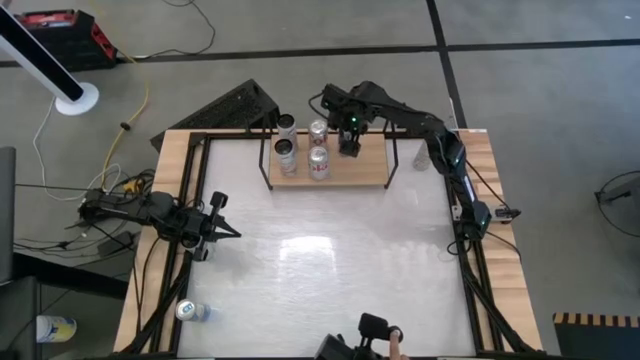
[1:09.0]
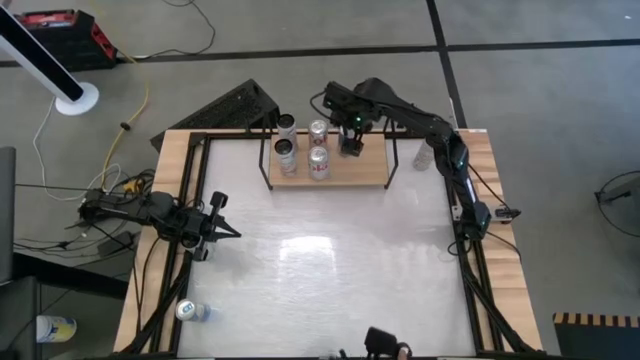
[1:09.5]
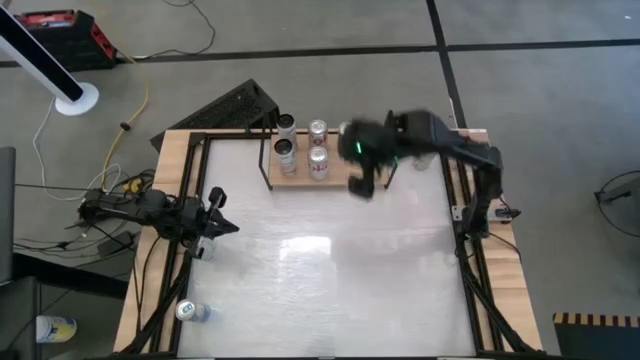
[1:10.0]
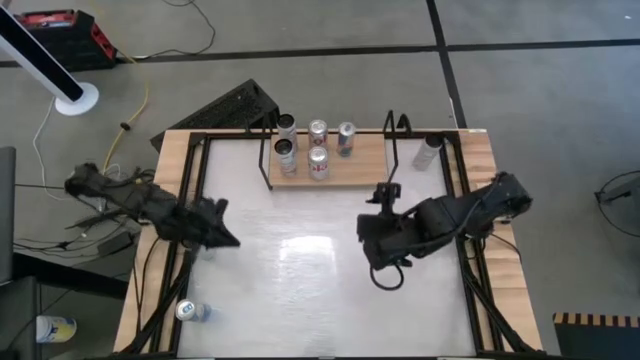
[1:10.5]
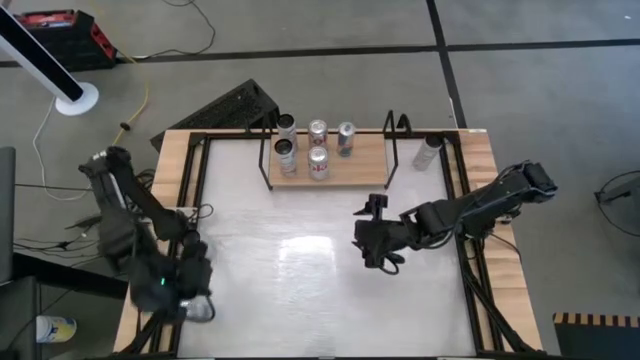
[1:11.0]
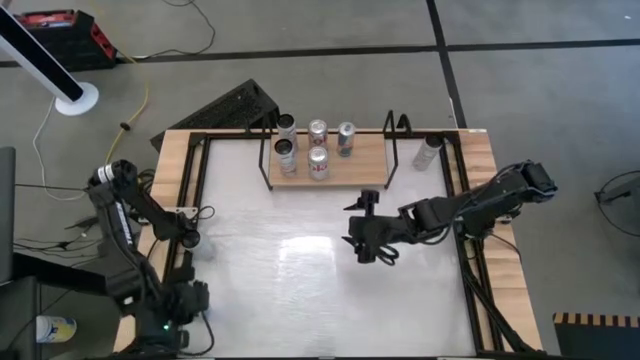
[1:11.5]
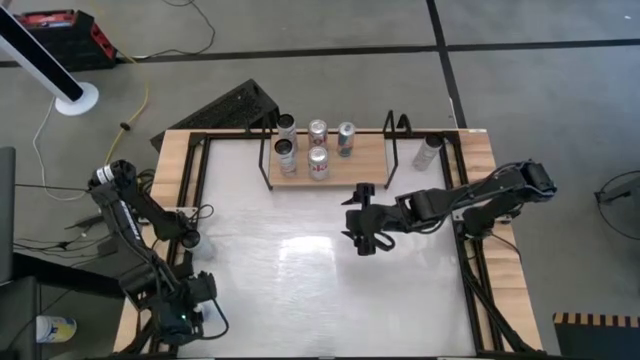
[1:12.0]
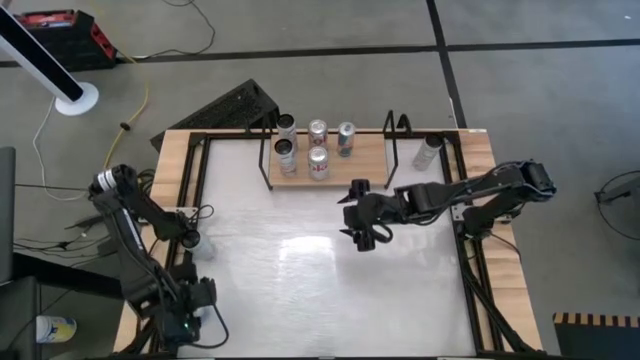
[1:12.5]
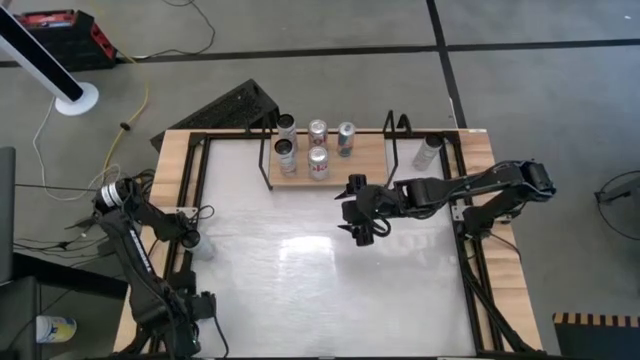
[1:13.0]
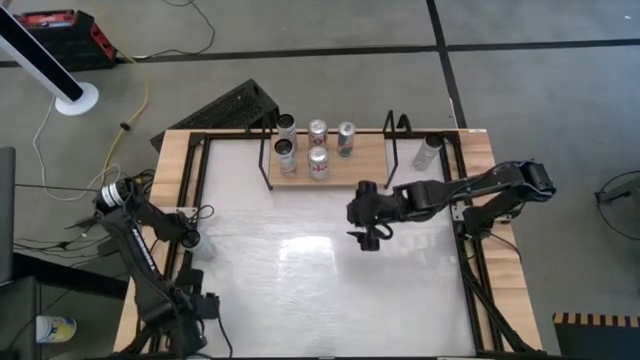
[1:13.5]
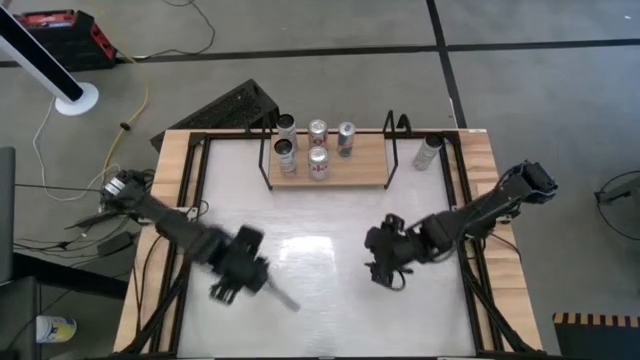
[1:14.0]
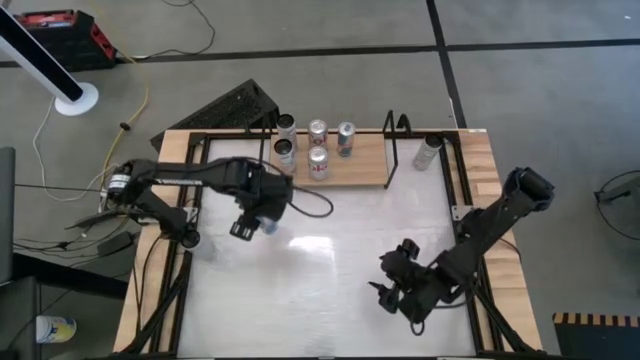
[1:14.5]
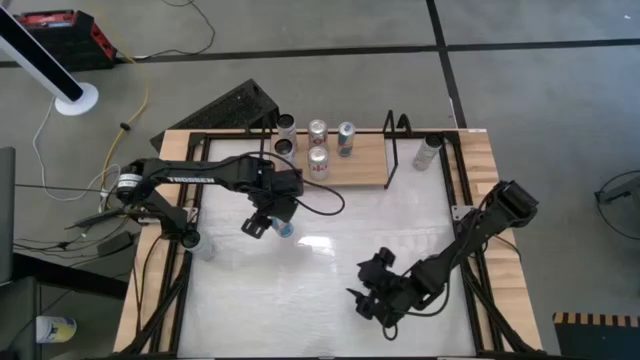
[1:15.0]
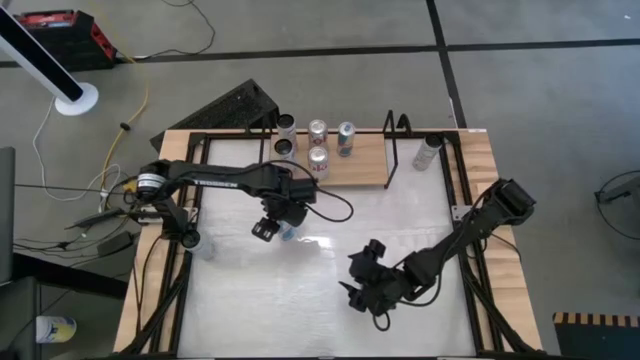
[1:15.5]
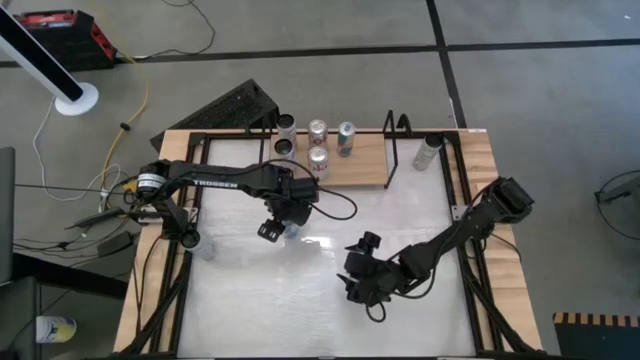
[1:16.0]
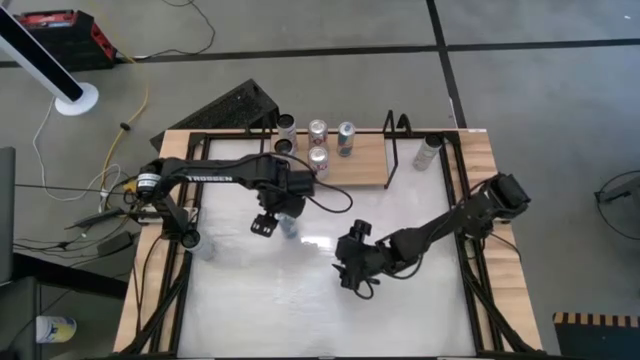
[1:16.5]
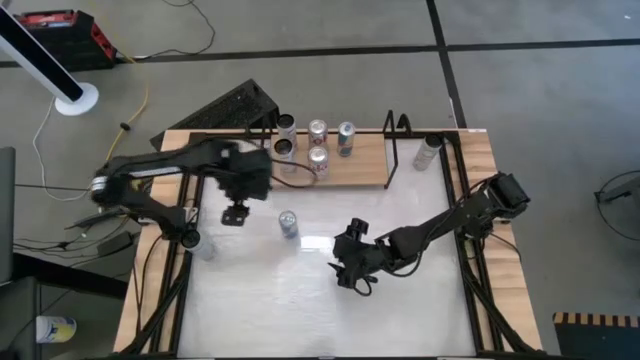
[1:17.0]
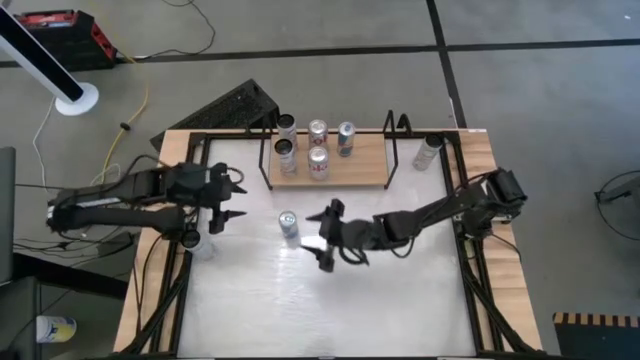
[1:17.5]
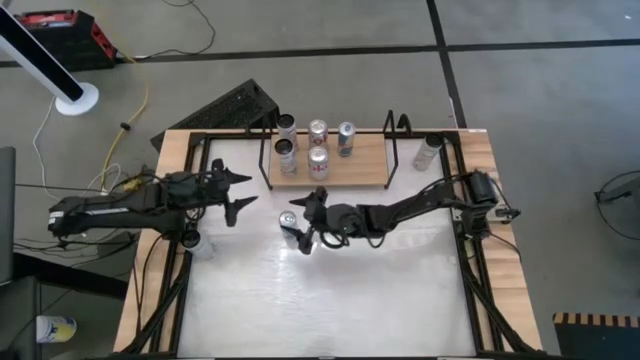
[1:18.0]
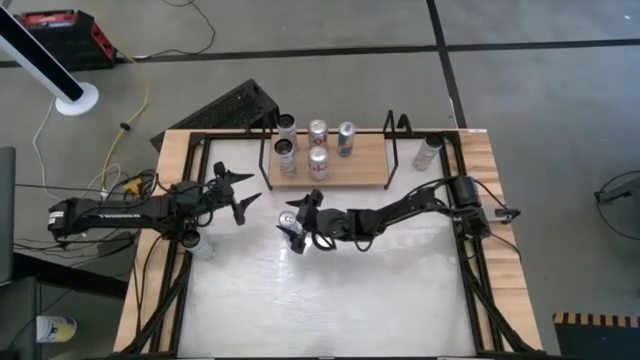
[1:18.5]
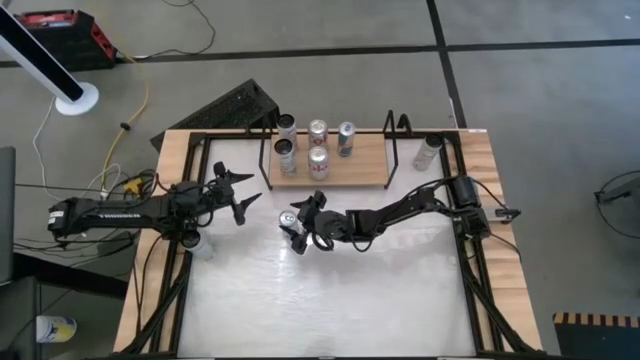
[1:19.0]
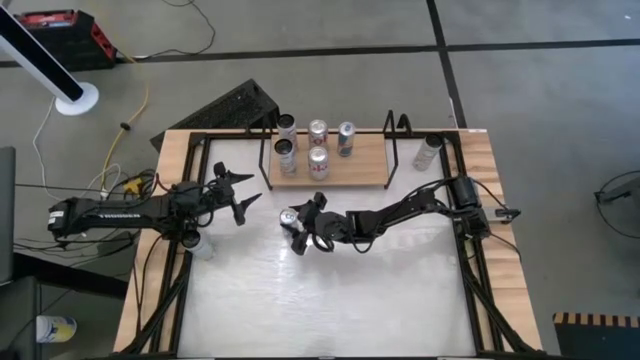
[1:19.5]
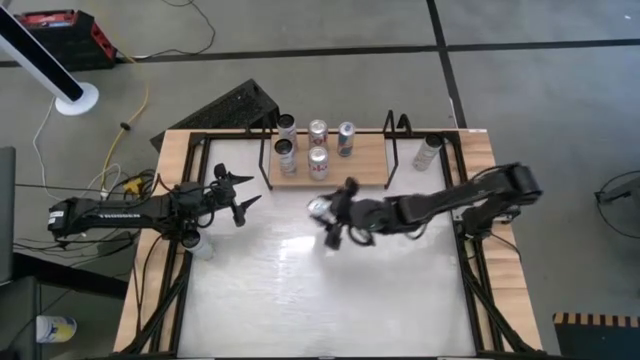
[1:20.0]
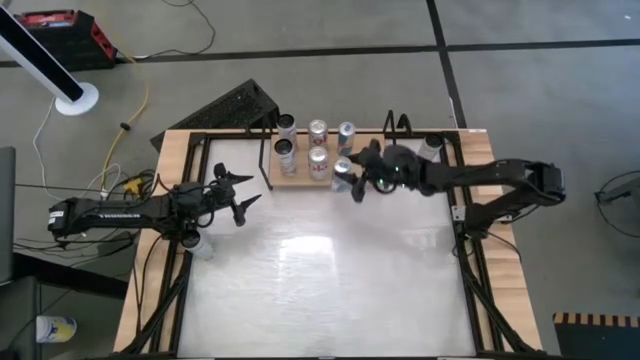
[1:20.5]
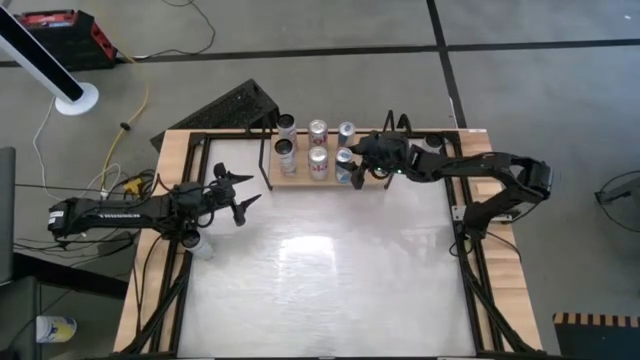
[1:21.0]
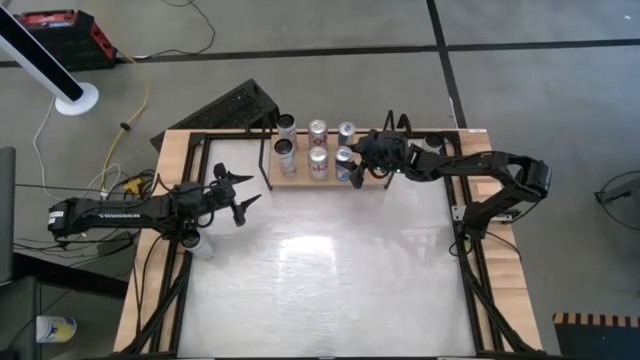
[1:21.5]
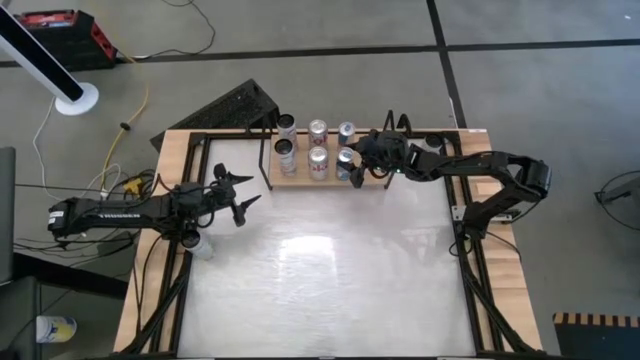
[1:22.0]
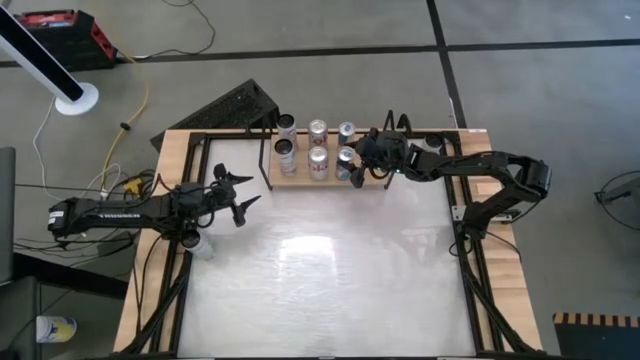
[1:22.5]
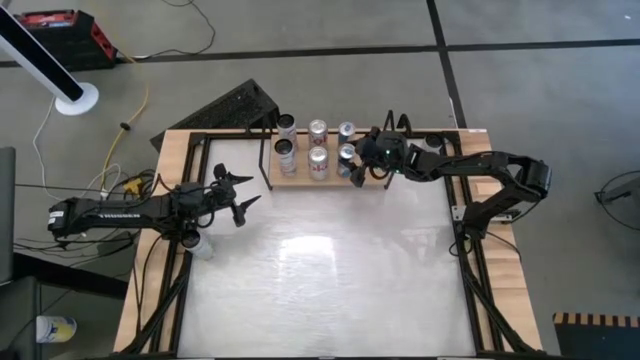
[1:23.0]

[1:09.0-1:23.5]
Task: Place canned beverage on shelf
Put the right blue soda can on the shelf aligned with the other blue soda can

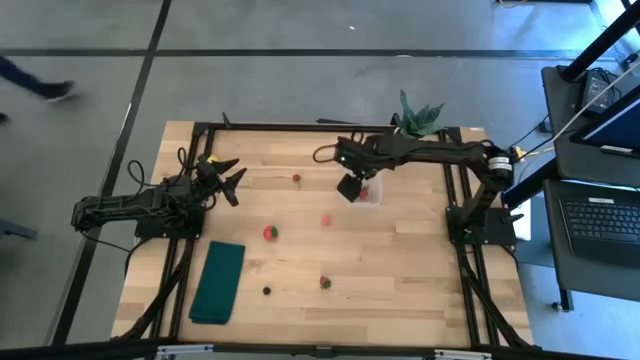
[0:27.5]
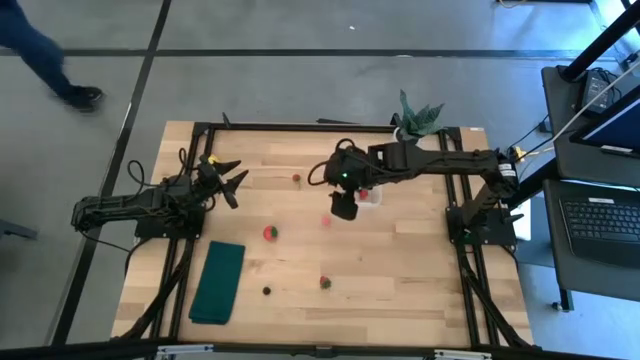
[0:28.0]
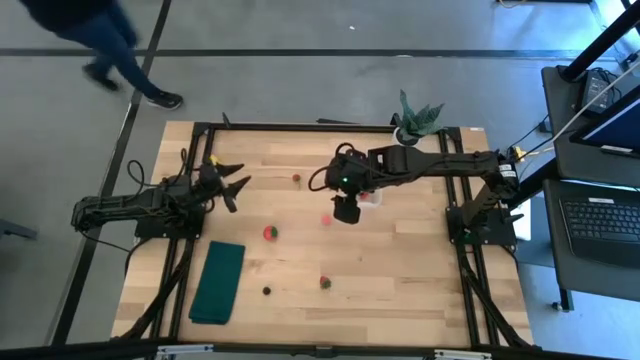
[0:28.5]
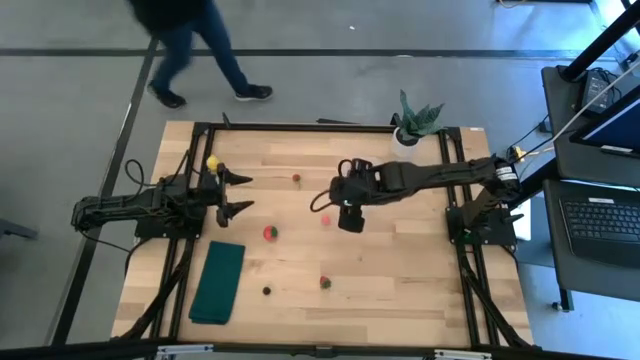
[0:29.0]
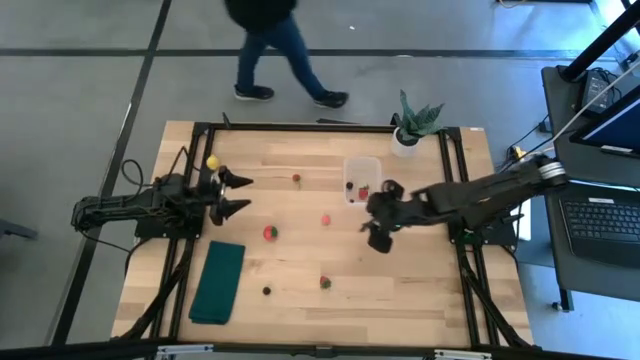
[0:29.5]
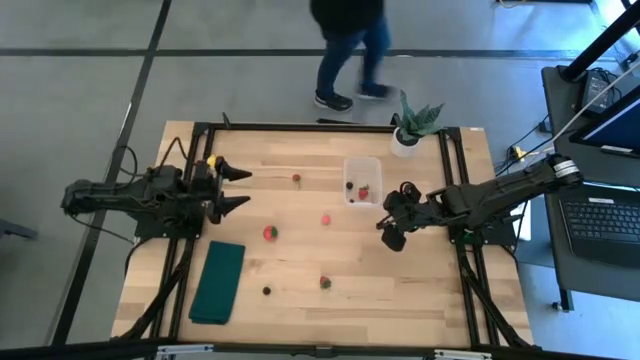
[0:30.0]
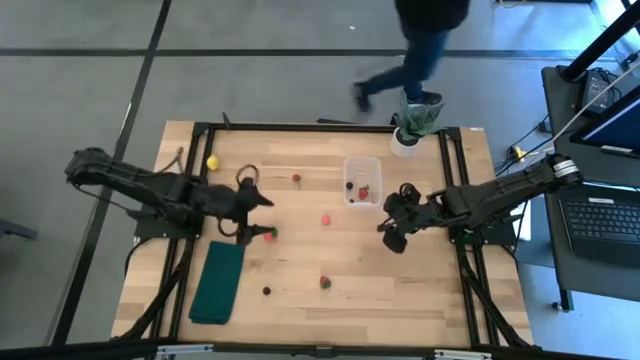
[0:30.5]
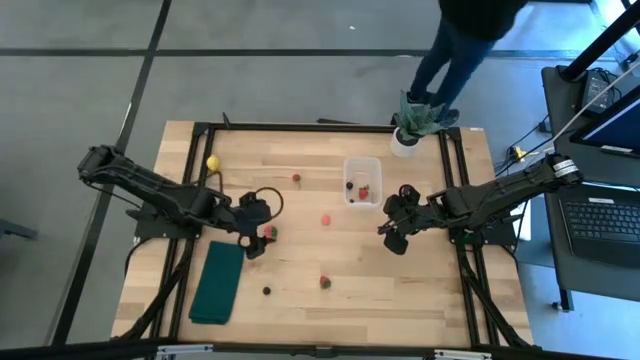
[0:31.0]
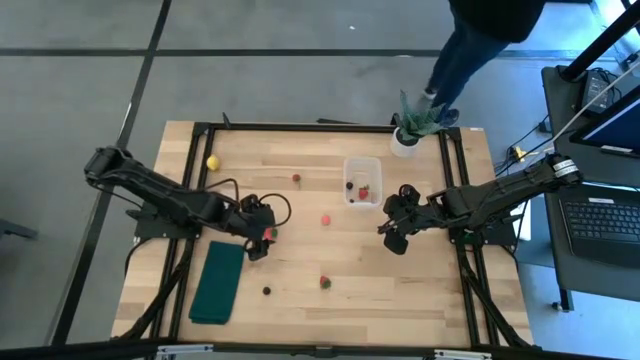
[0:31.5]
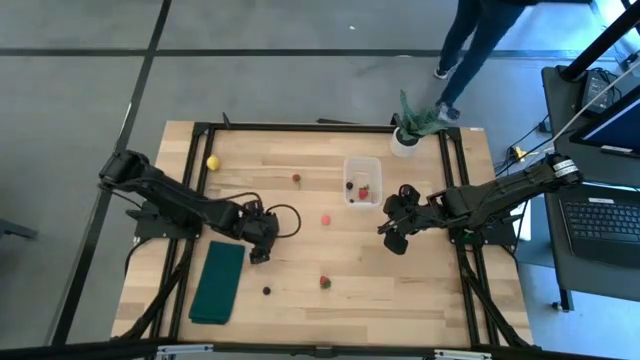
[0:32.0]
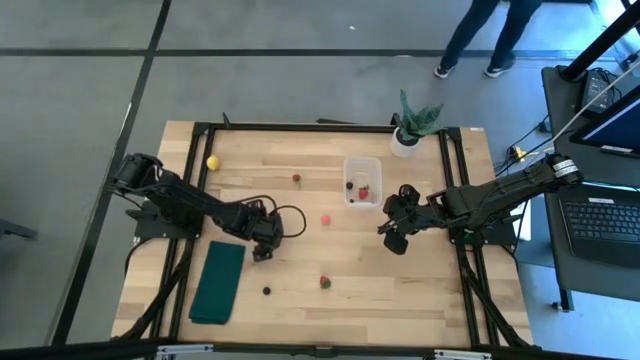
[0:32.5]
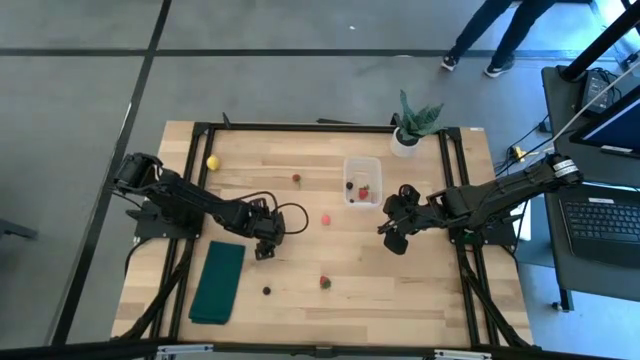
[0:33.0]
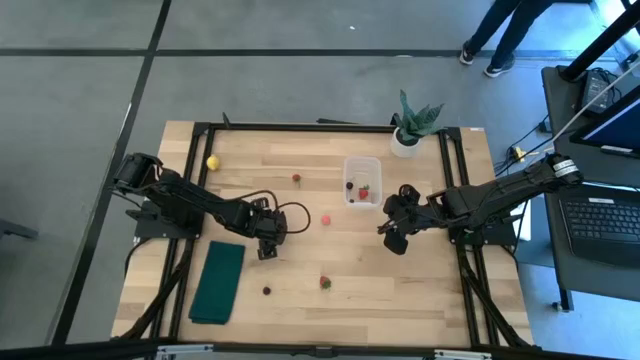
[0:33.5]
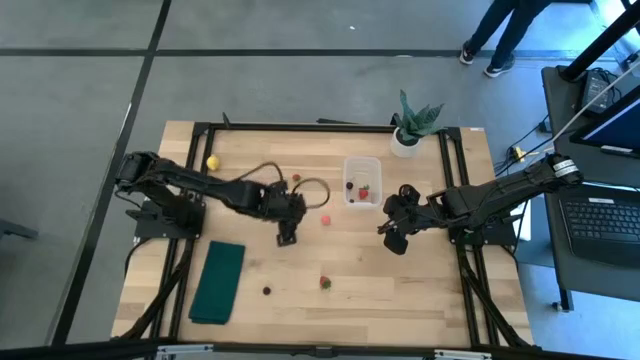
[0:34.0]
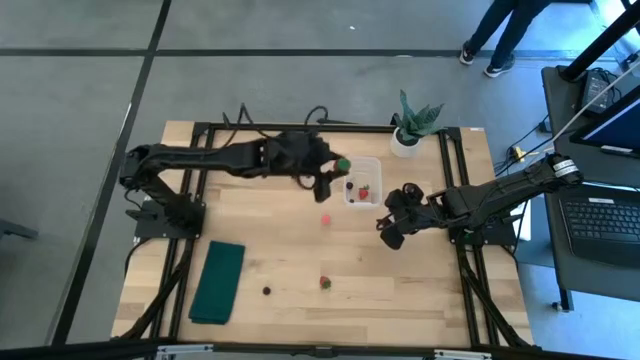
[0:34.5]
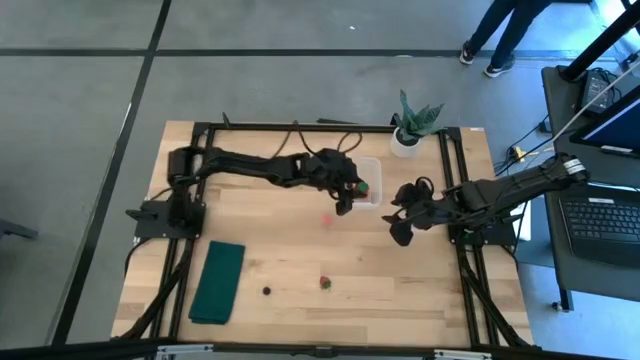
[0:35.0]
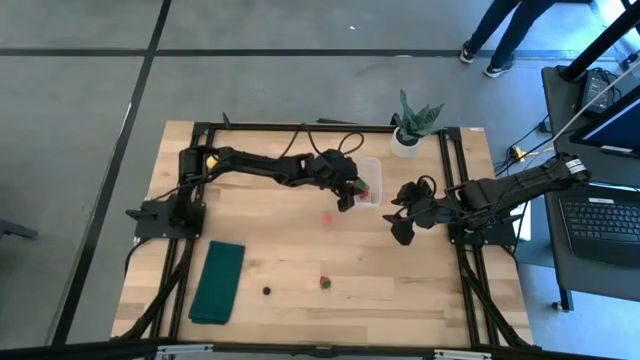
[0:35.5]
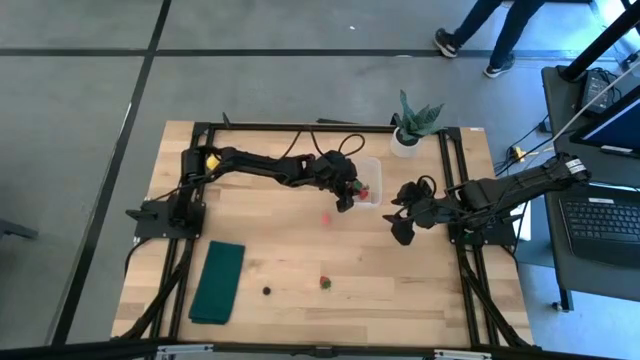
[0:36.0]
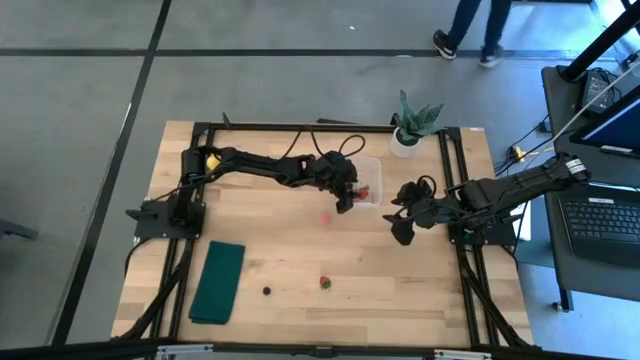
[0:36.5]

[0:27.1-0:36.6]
Task: Pick and placing Produce into tupperware
Put the red tomato into the transparent container
